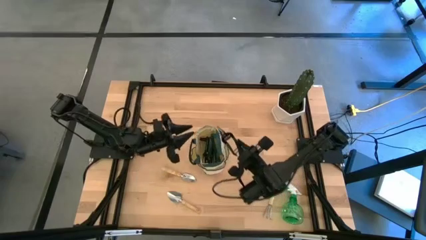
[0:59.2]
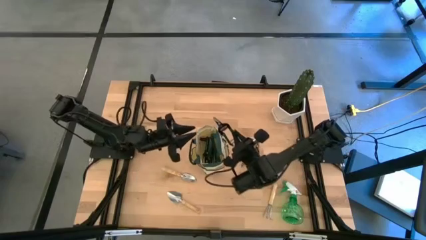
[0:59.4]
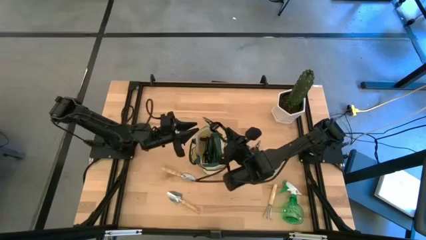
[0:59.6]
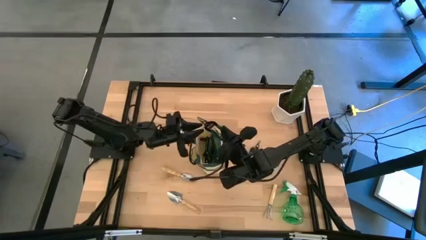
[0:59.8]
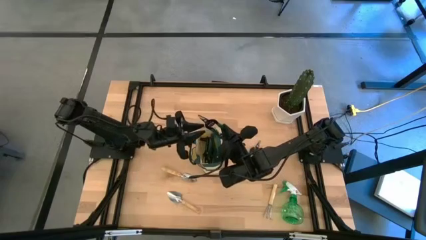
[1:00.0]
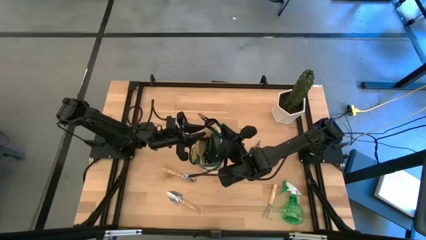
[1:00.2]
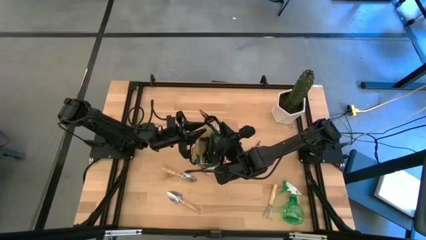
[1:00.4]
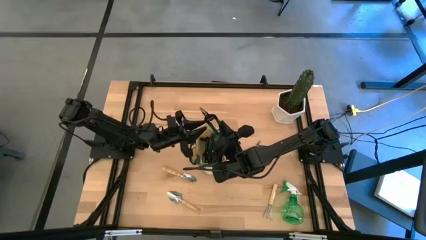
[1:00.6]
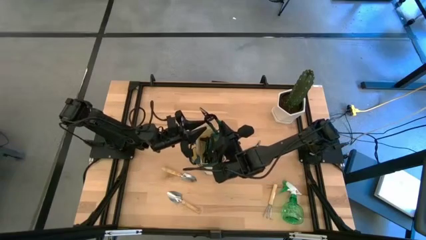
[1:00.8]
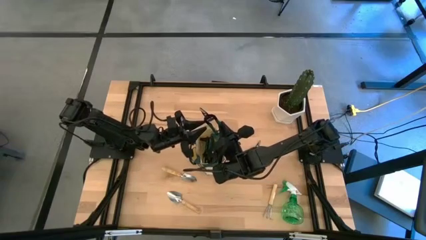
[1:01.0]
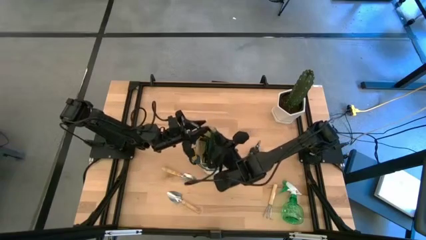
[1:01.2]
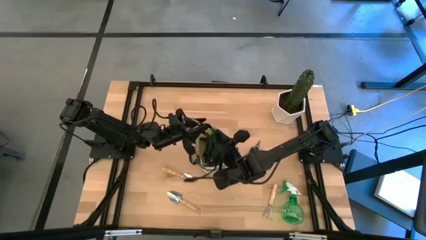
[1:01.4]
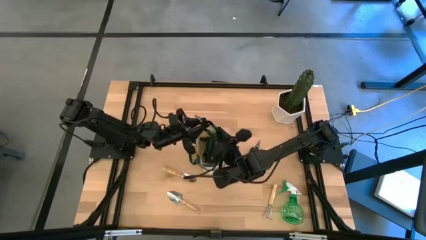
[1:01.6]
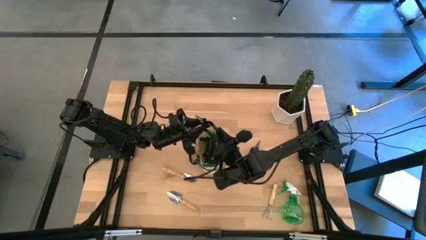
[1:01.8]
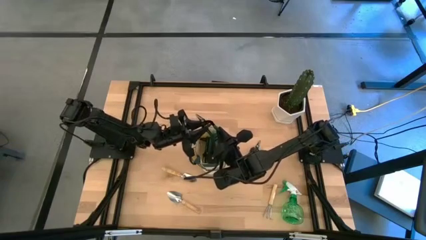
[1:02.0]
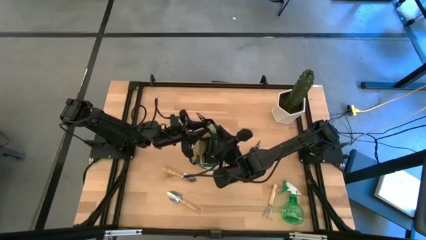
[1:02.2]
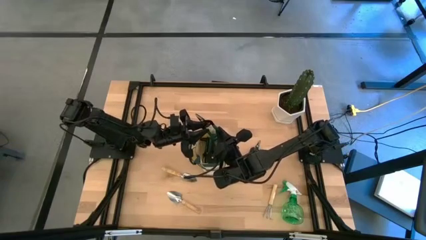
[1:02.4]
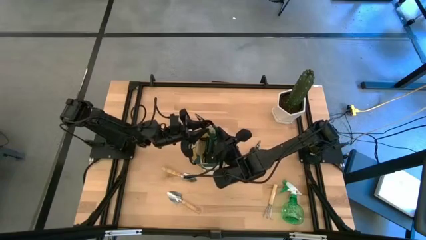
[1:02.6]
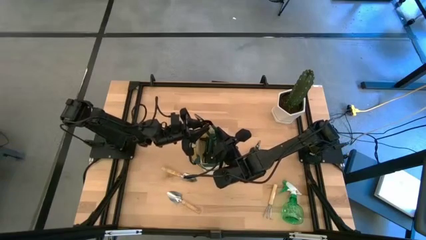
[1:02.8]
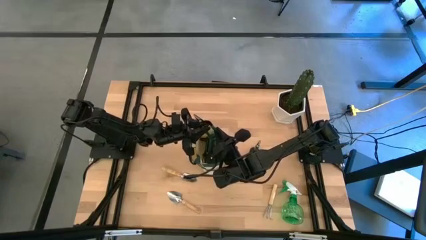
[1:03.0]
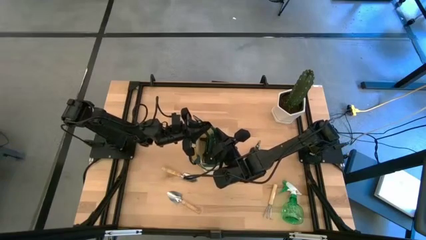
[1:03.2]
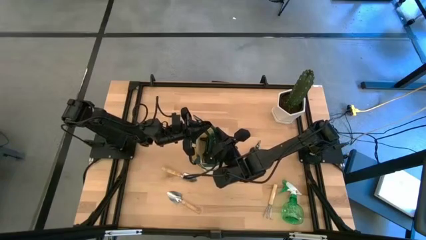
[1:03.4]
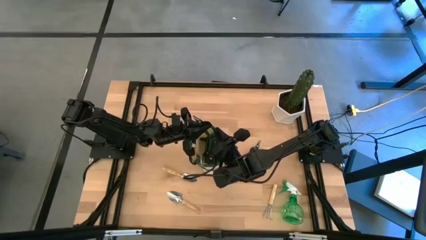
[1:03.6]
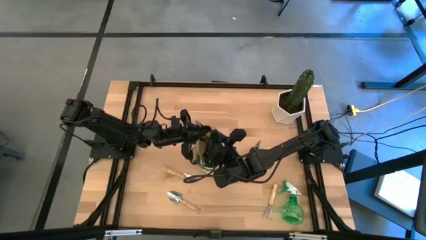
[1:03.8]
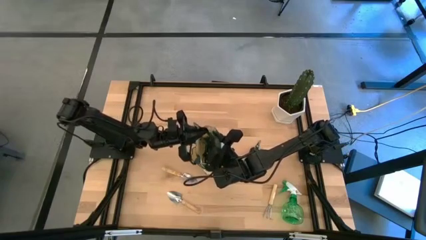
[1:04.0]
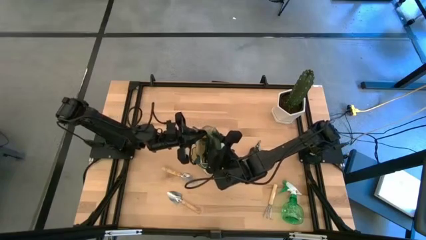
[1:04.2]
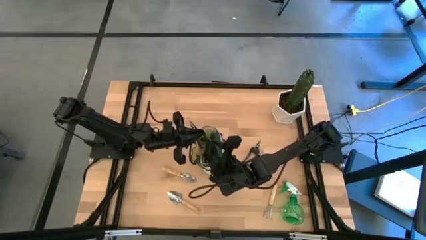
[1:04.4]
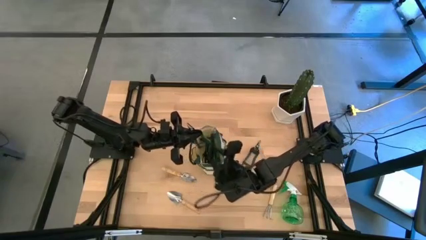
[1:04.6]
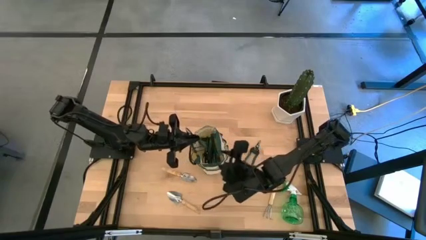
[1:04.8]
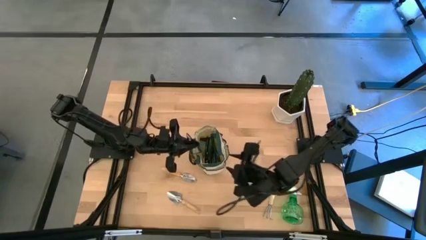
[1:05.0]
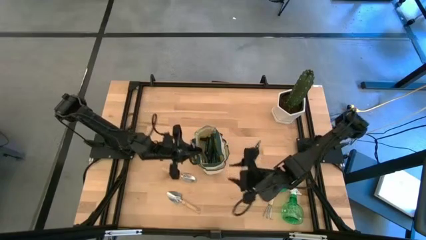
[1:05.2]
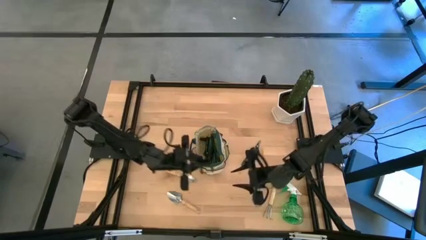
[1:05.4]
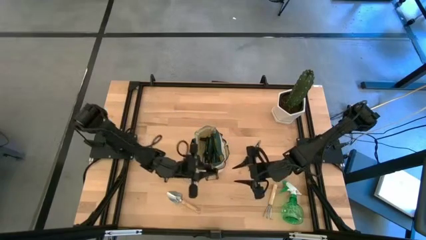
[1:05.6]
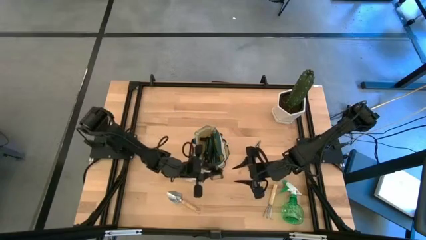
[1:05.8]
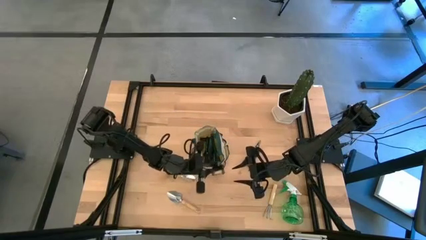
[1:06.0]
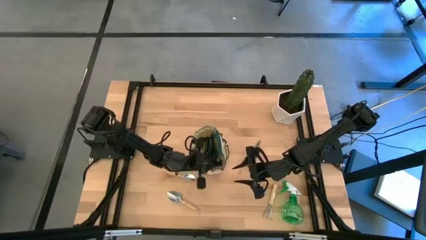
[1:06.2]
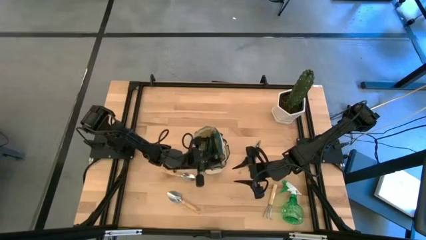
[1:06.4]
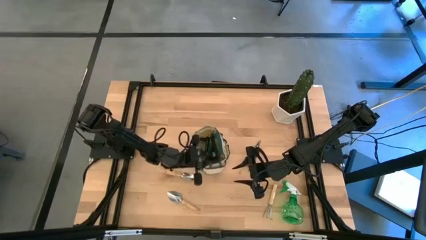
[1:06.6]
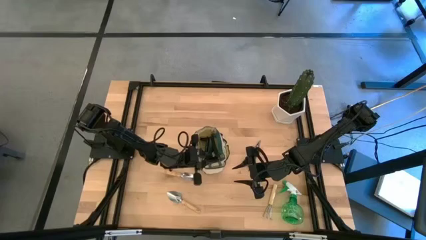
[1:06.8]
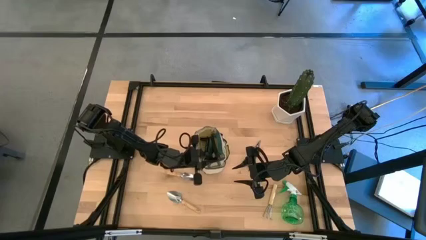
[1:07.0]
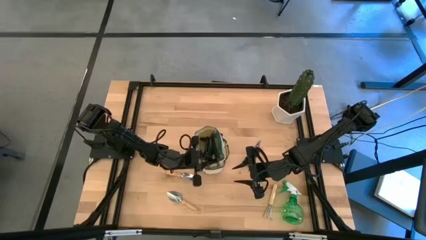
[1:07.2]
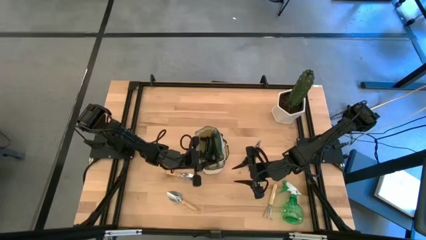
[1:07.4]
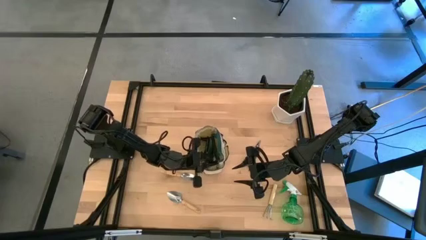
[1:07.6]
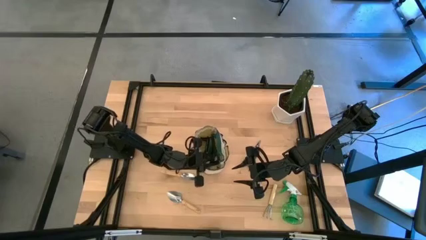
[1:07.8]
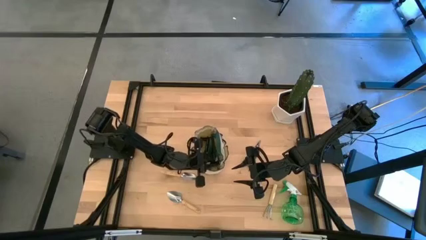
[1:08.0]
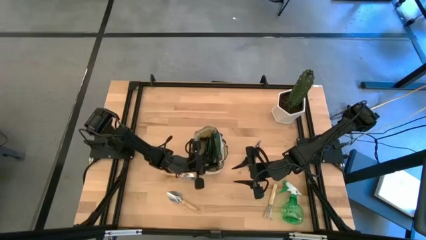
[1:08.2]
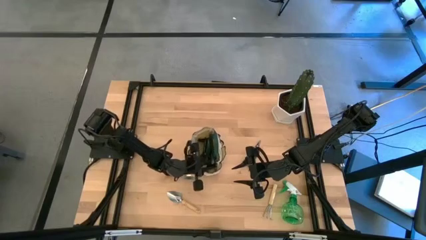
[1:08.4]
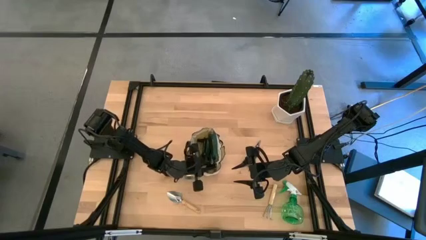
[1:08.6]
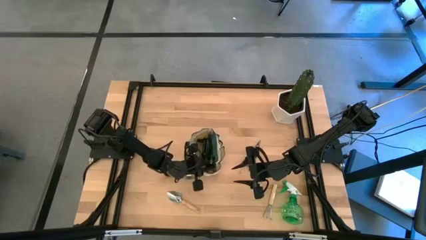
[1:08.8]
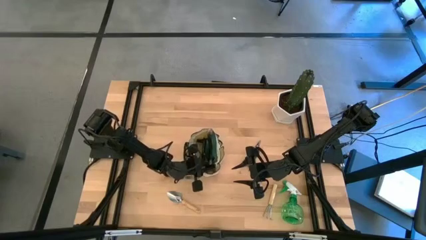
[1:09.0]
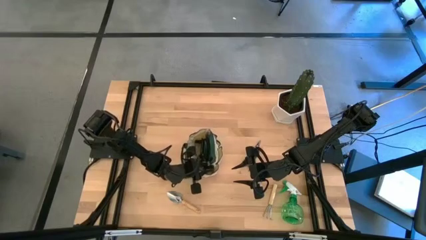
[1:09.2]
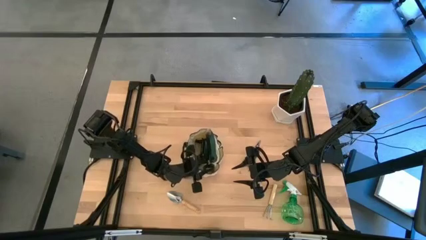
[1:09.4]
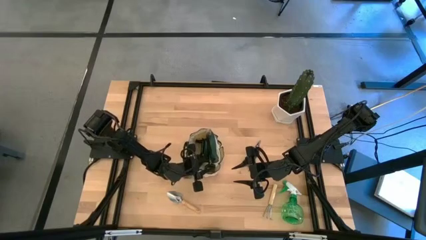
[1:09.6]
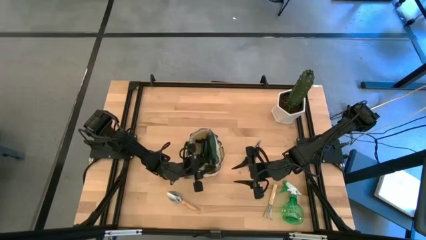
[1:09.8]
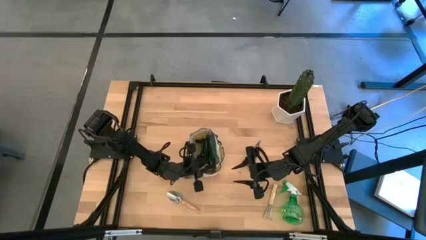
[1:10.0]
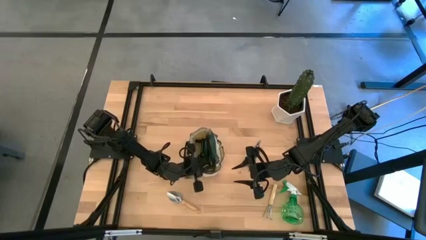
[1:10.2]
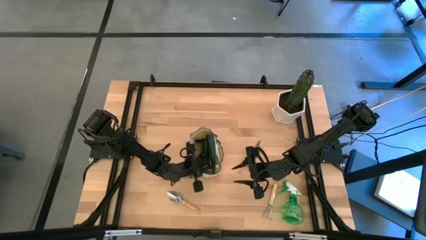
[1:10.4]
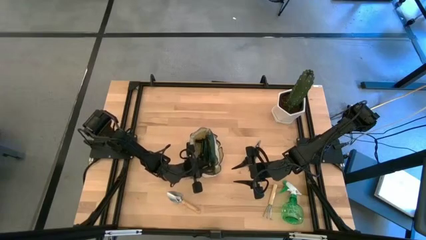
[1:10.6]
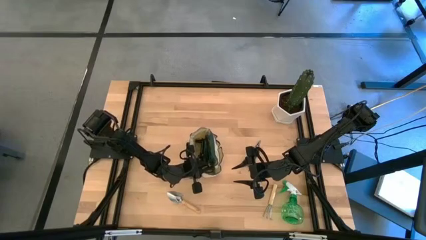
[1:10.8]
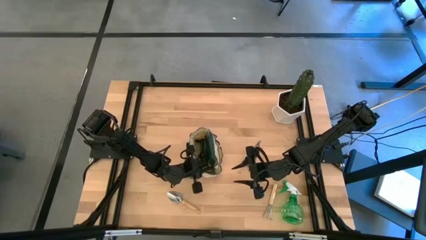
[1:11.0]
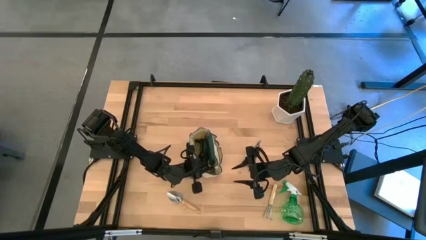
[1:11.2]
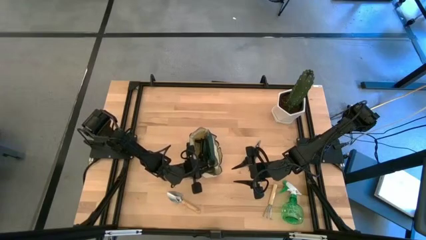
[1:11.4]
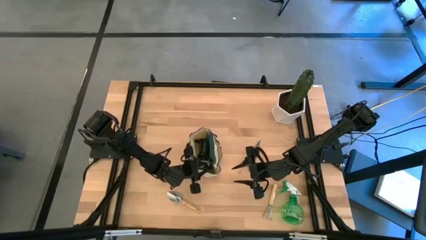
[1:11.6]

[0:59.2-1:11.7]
Task: Pick & Place Garden tools in Gardening bag
Put the bottom green fruit pruner into the green gardening bag
